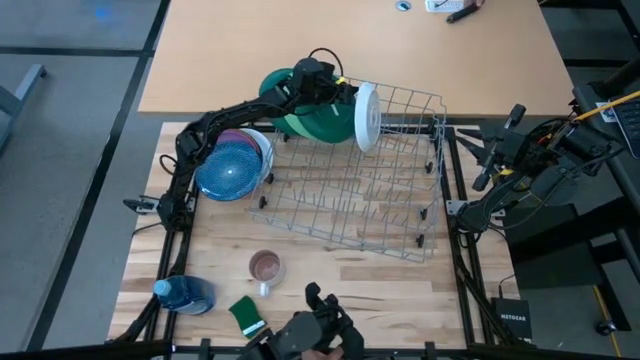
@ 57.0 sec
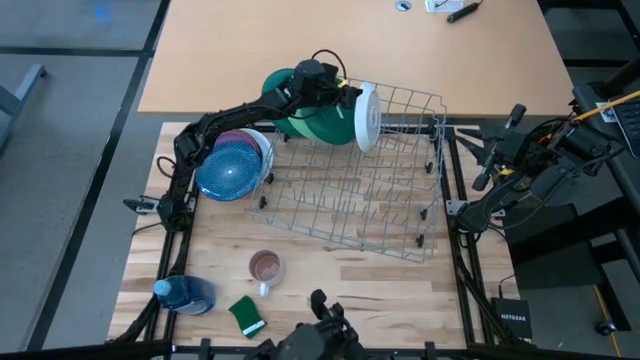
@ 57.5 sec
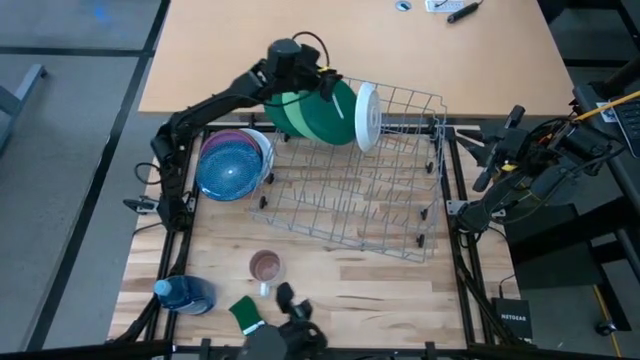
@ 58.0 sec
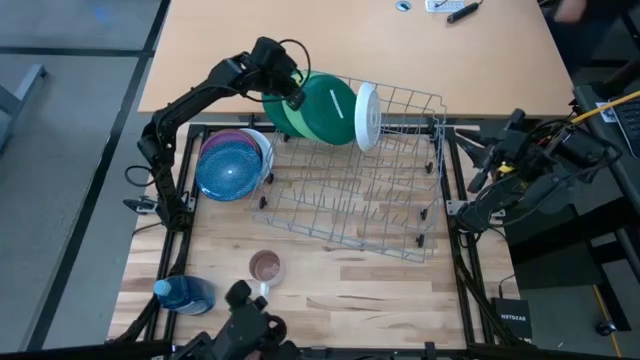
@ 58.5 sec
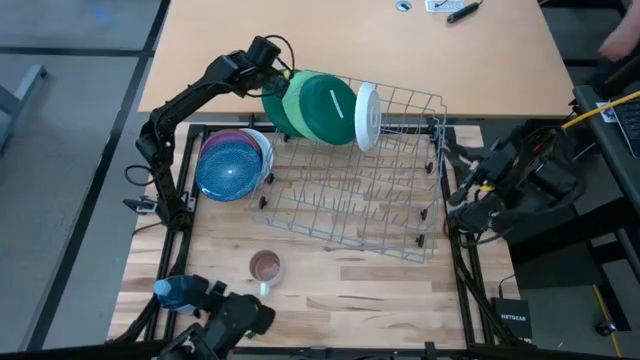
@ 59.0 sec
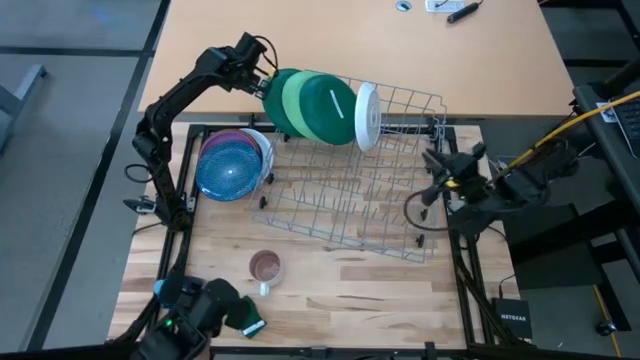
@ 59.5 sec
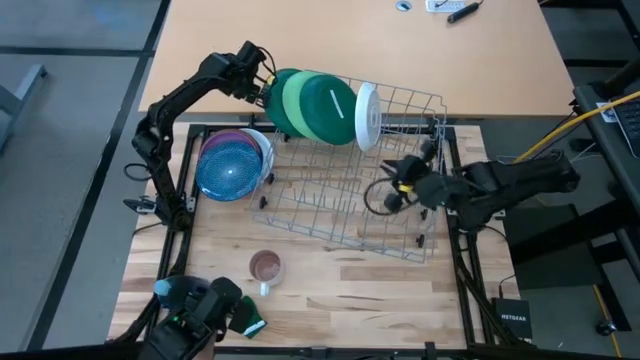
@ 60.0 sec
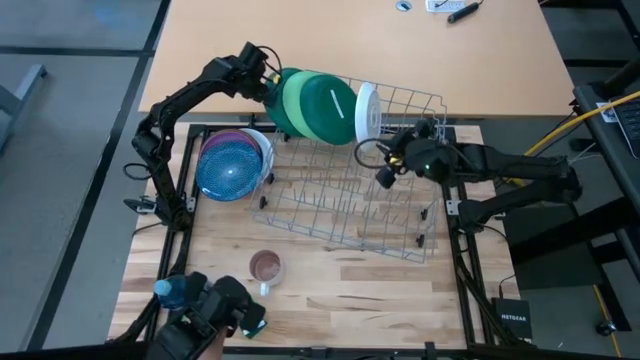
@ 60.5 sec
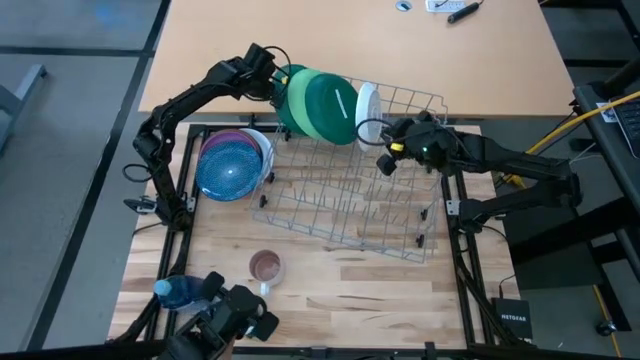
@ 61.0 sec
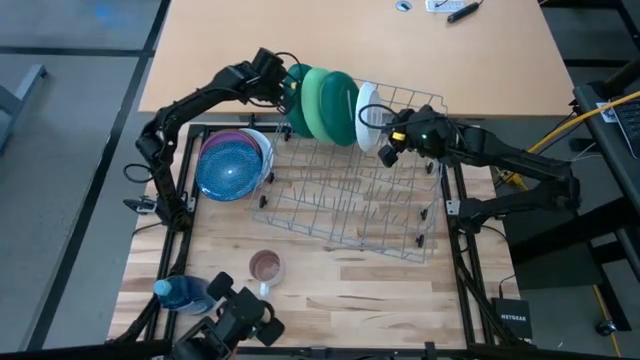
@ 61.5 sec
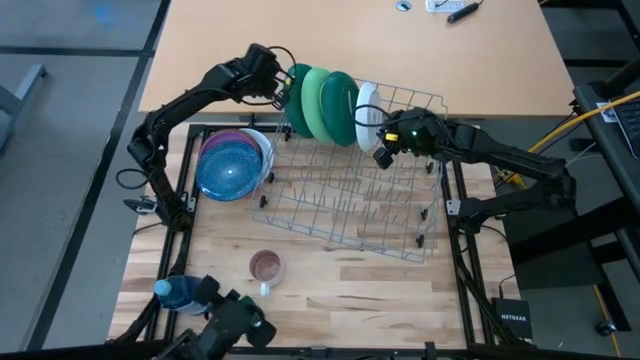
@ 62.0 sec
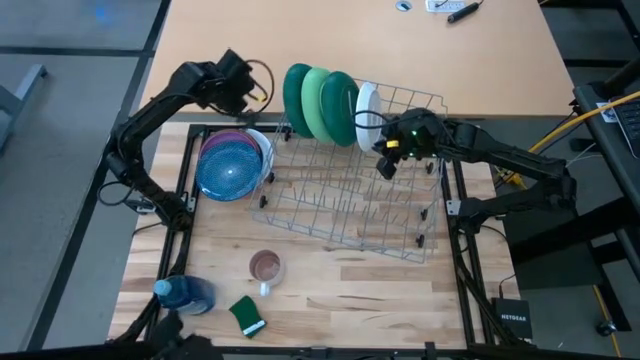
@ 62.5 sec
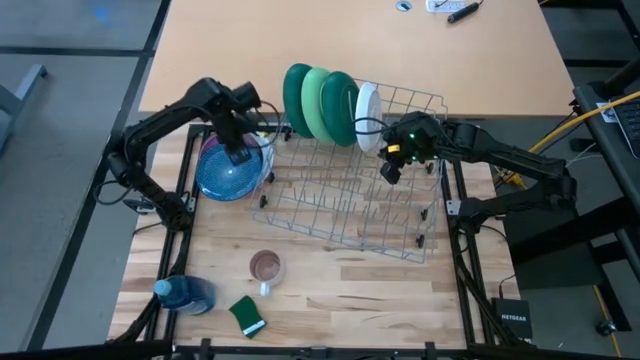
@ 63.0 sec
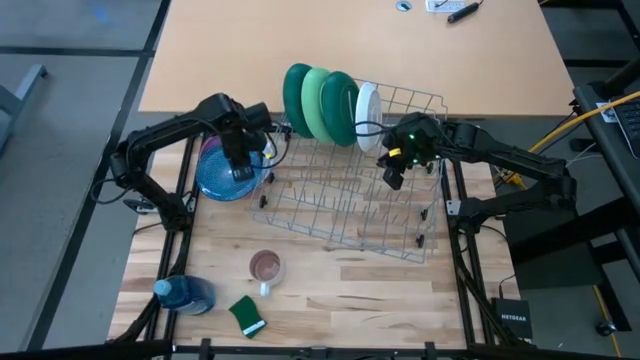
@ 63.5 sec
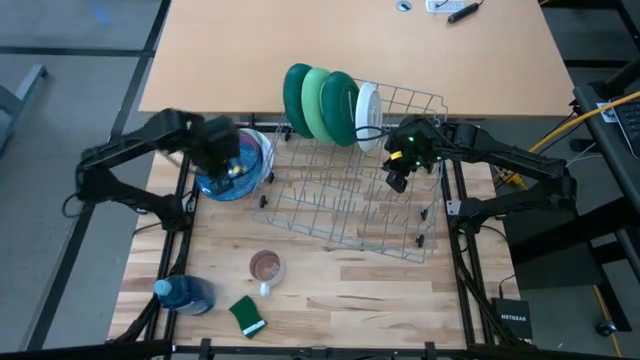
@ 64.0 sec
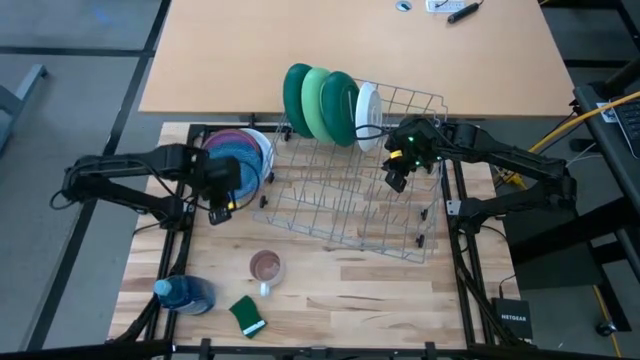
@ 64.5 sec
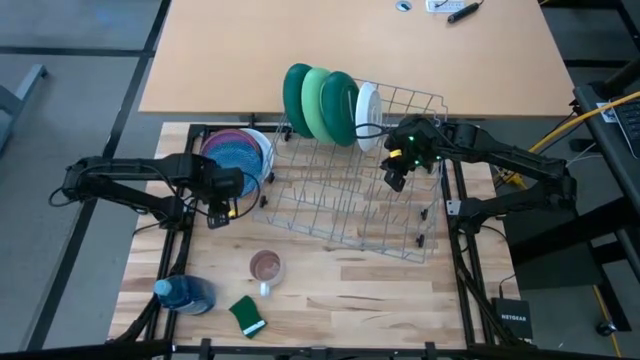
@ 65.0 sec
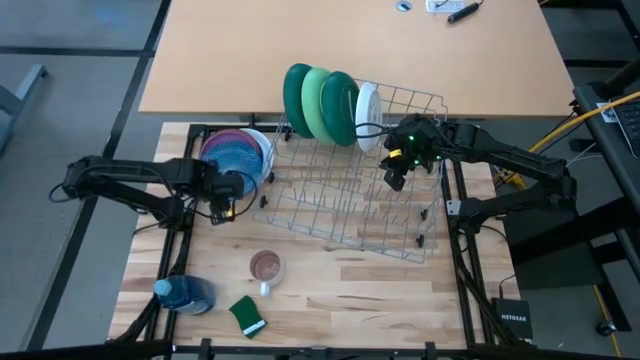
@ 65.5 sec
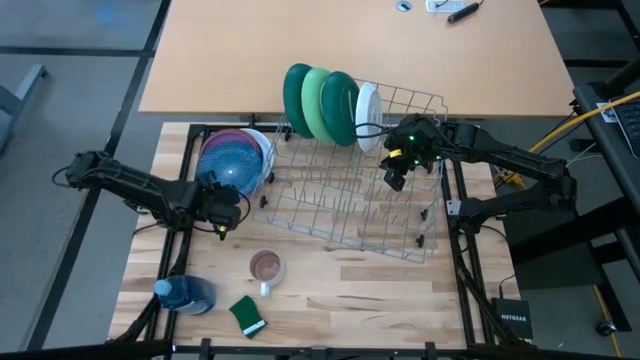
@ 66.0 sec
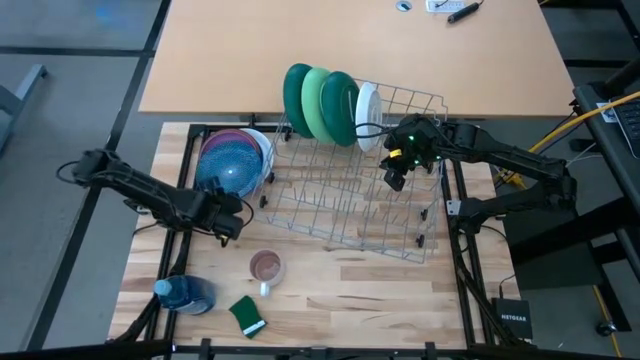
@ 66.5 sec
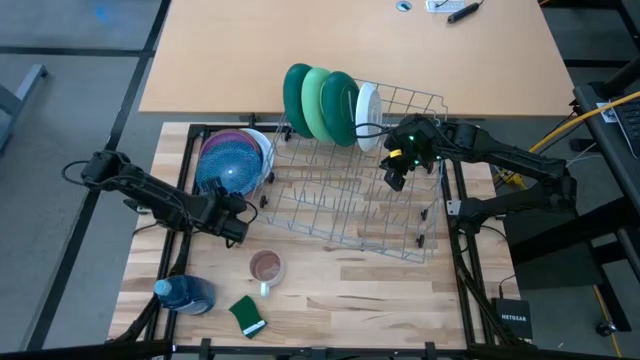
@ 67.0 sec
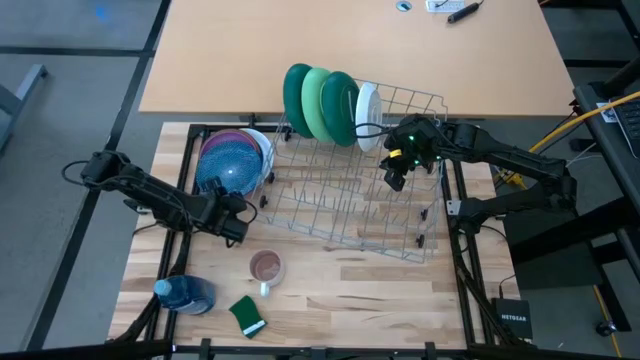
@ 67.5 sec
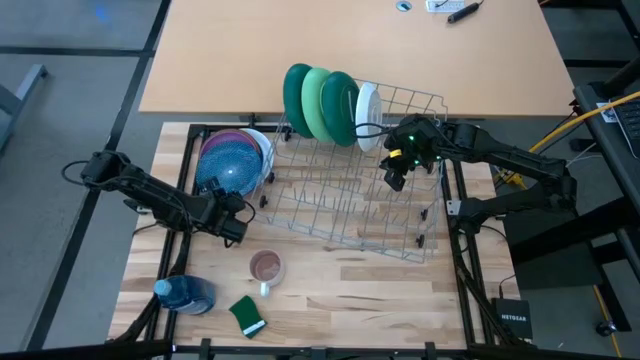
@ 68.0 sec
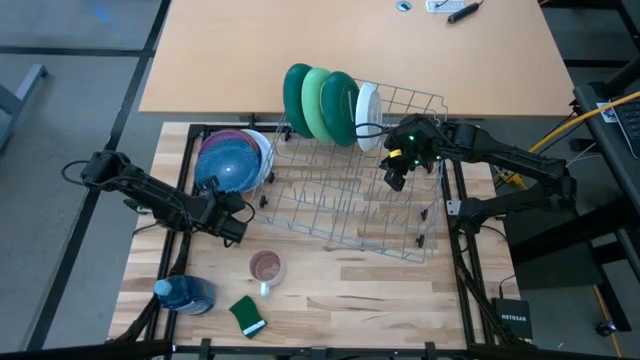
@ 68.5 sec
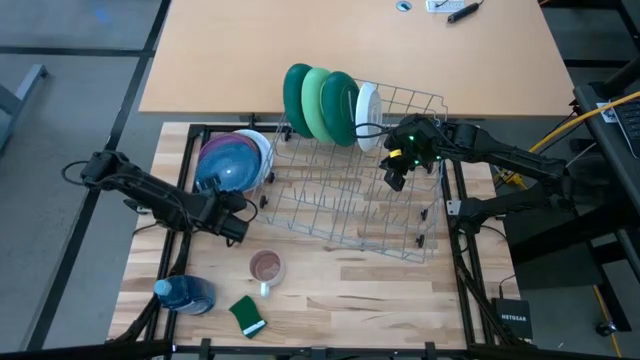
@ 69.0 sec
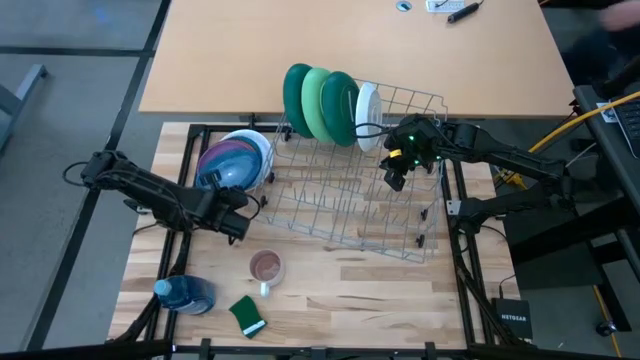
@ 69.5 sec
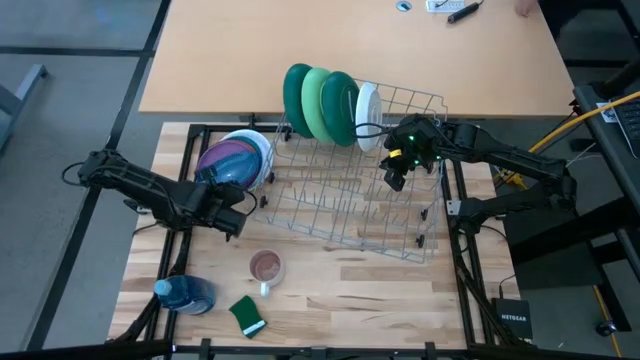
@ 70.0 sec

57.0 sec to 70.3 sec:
Task: Sort dishes
Put the blue plate into the dishwasher rack

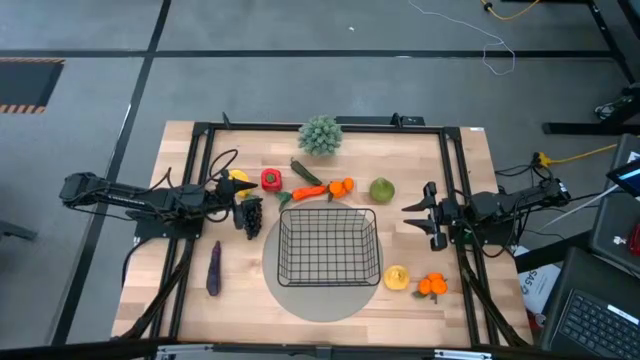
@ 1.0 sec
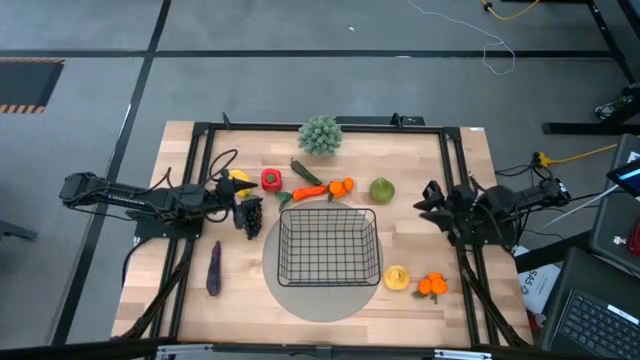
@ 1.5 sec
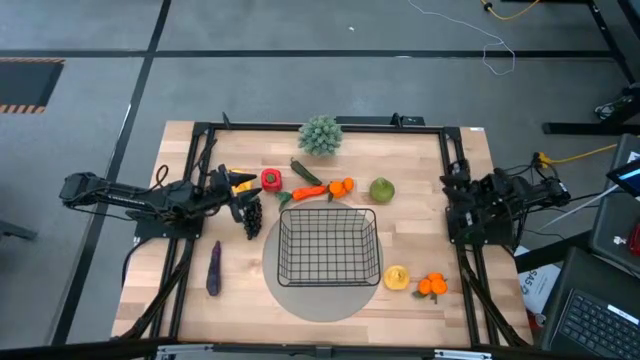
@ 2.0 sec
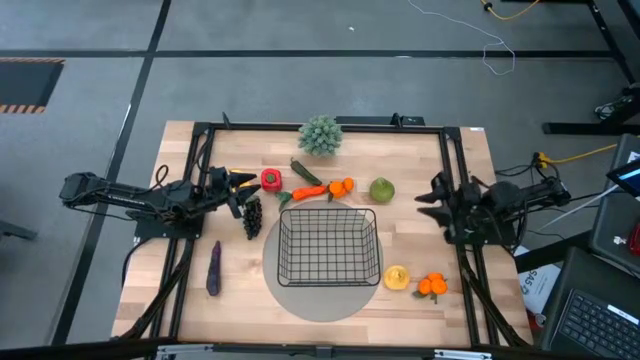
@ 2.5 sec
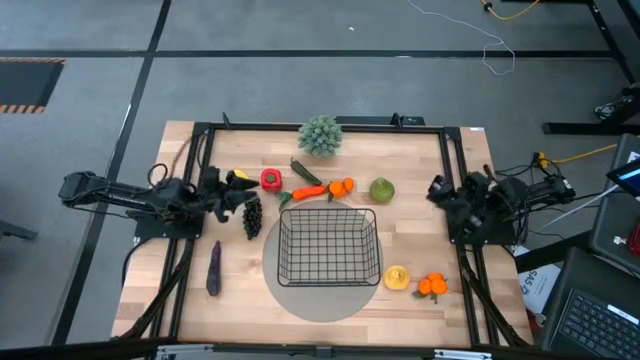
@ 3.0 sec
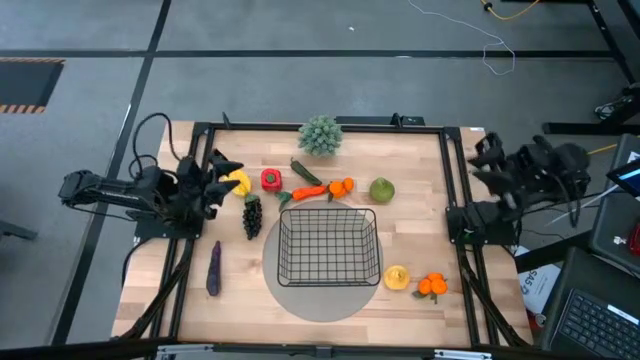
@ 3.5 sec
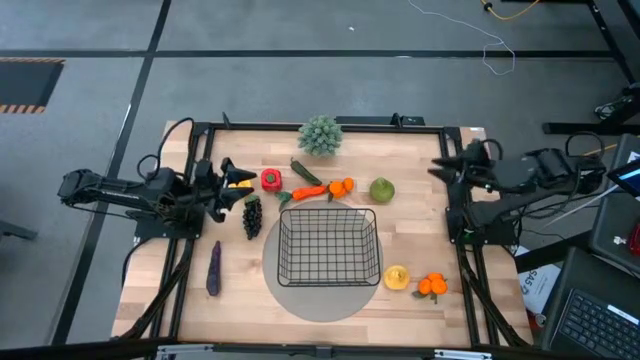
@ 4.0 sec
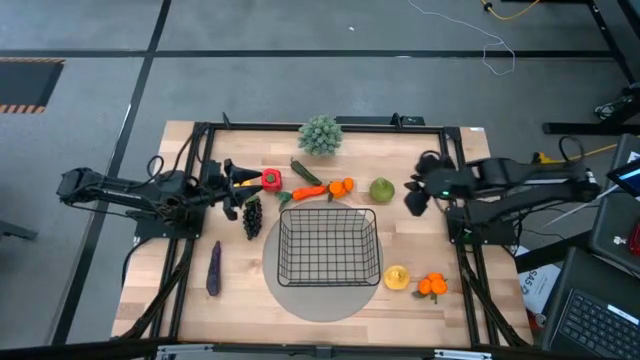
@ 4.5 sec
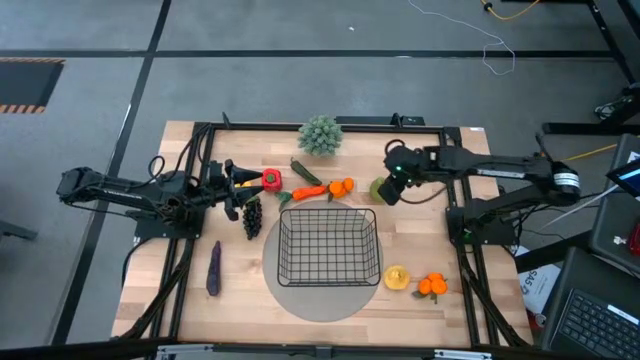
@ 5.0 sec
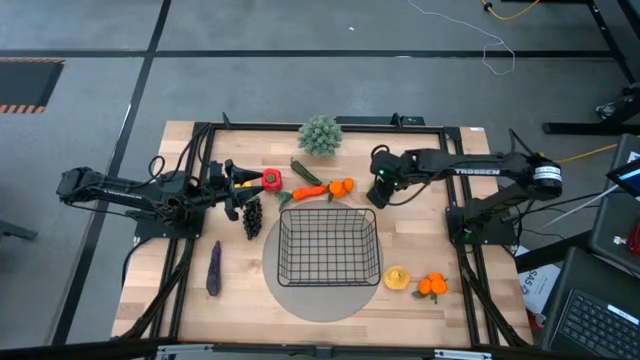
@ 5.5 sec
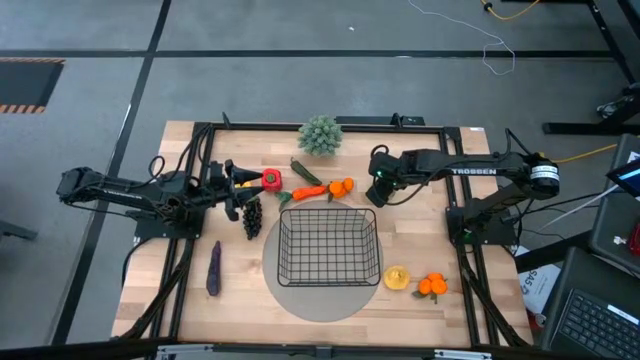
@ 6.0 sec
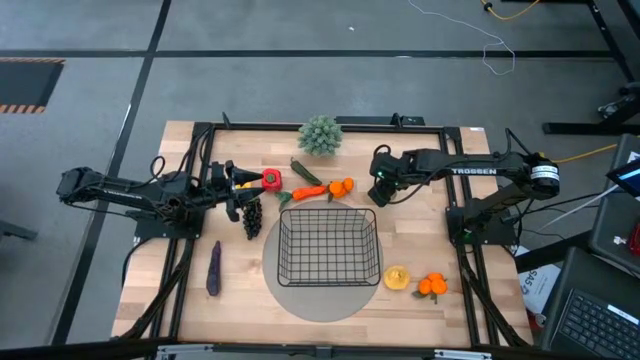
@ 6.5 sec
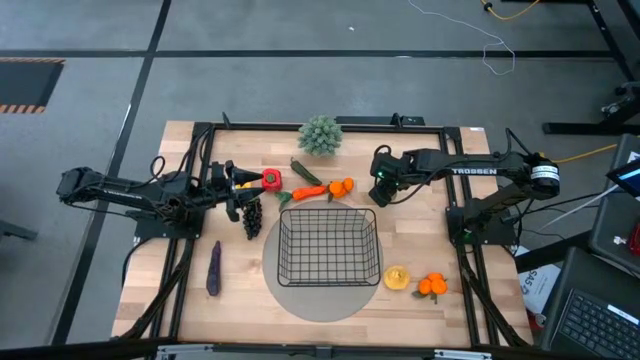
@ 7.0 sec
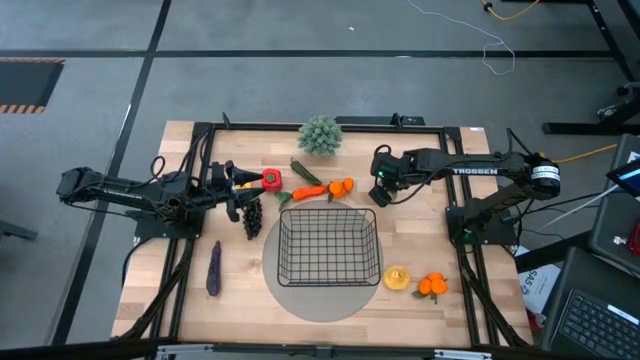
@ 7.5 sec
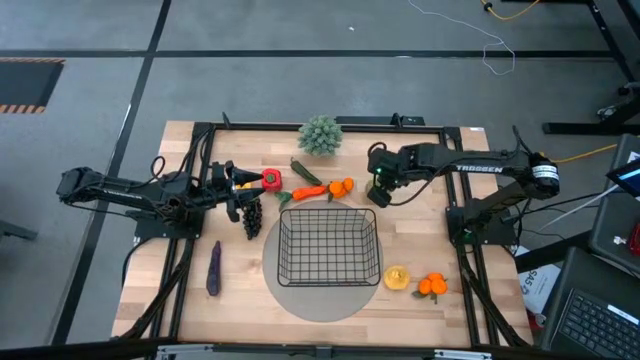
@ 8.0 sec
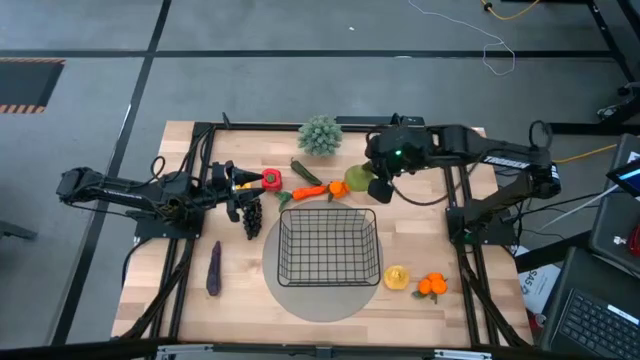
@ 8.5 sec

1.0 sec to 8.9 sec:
Task: Build produce basket
Put the green pear into the black wire basket
